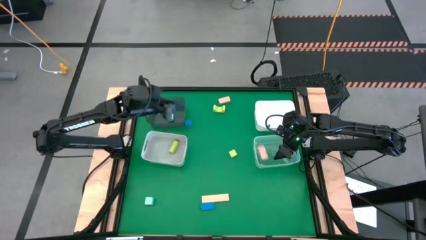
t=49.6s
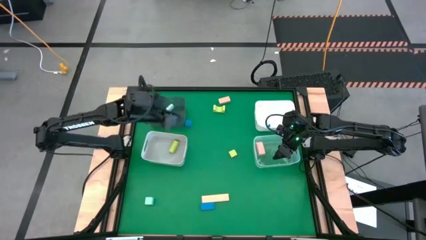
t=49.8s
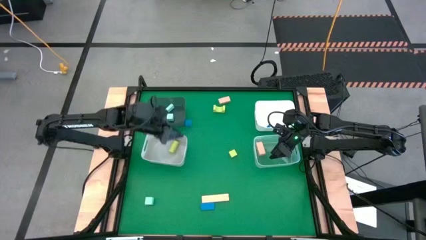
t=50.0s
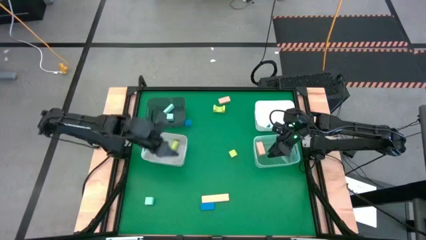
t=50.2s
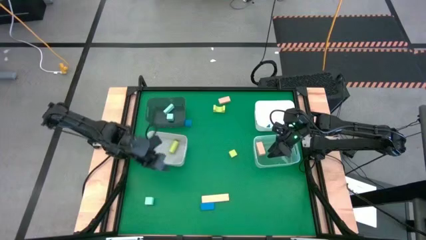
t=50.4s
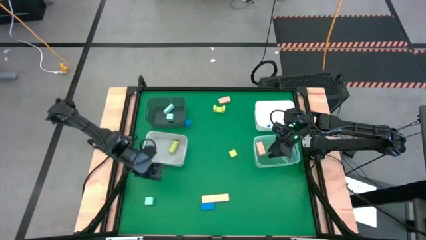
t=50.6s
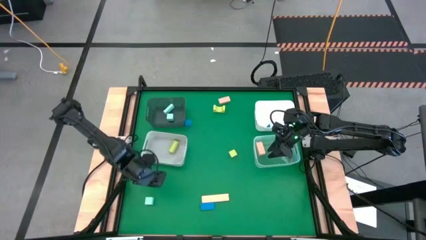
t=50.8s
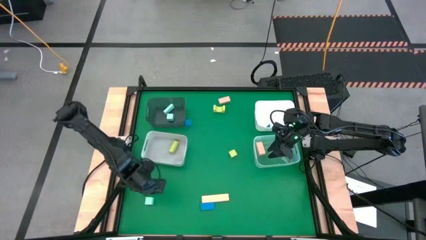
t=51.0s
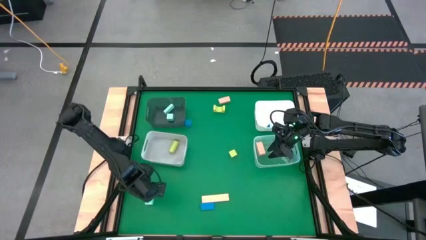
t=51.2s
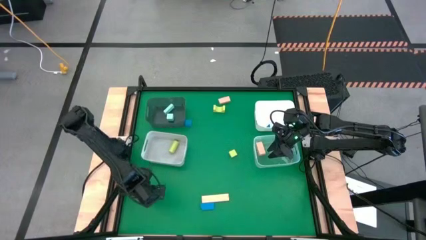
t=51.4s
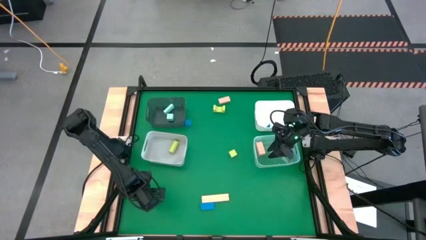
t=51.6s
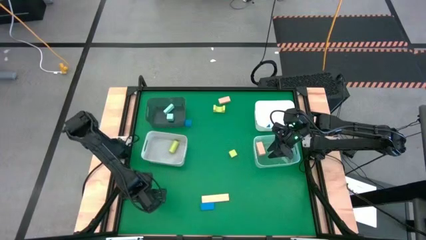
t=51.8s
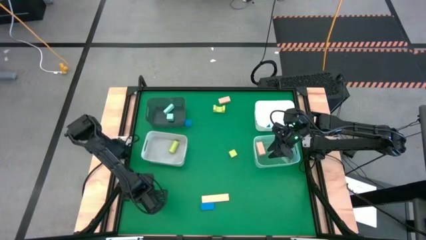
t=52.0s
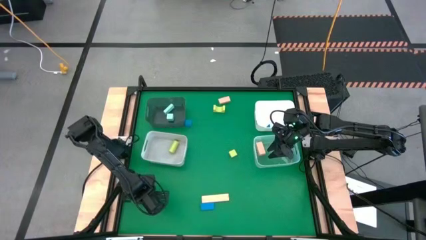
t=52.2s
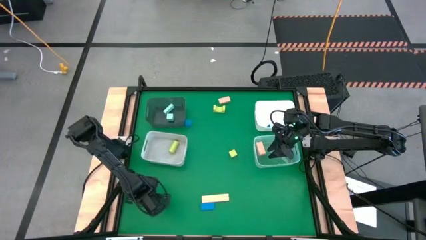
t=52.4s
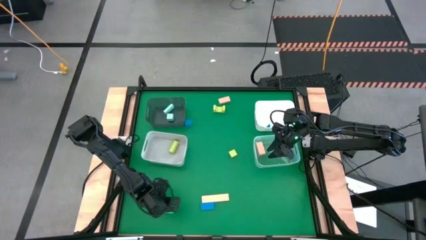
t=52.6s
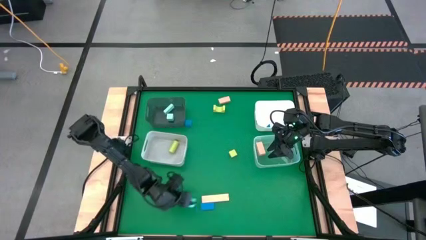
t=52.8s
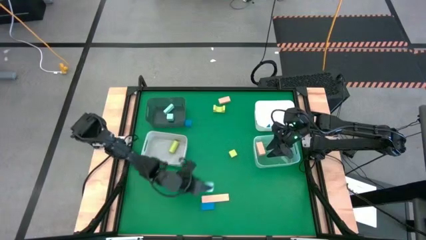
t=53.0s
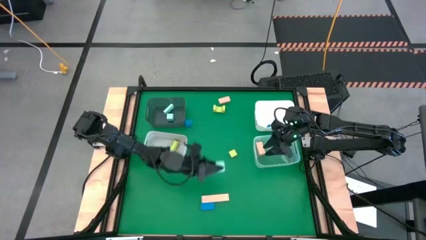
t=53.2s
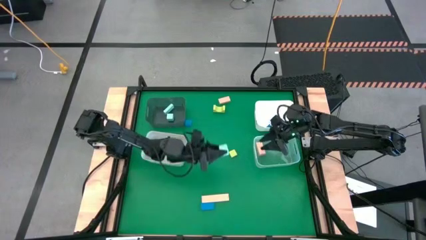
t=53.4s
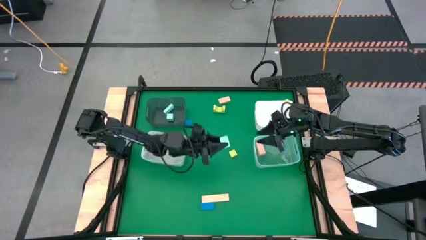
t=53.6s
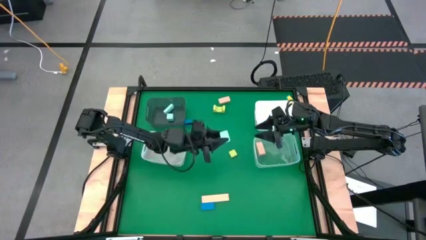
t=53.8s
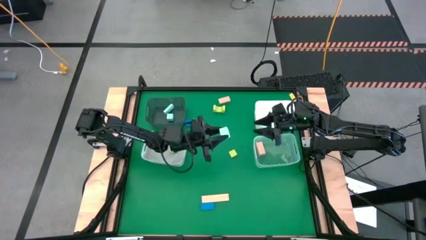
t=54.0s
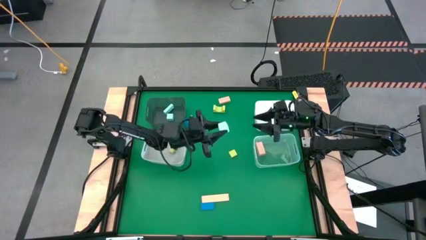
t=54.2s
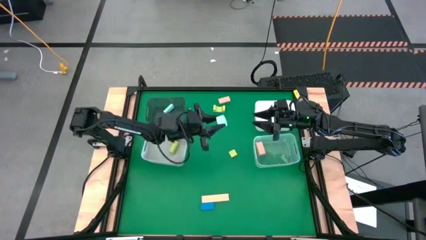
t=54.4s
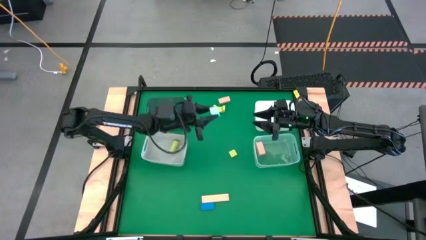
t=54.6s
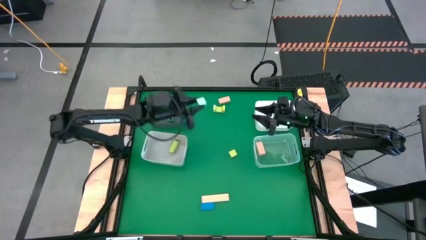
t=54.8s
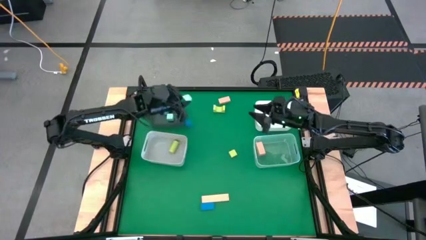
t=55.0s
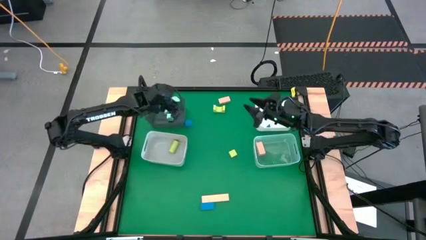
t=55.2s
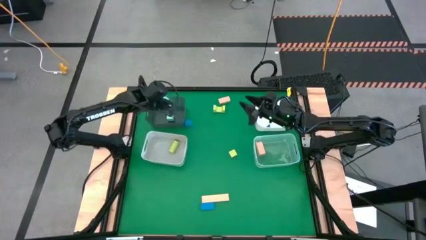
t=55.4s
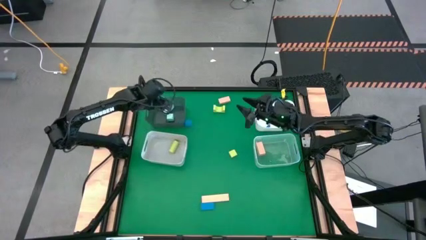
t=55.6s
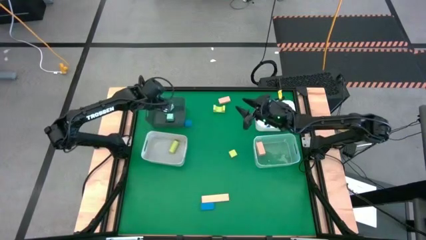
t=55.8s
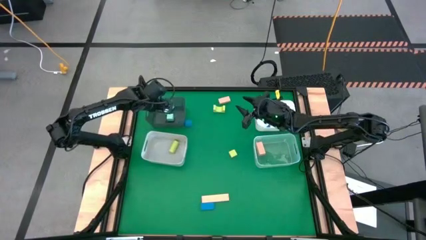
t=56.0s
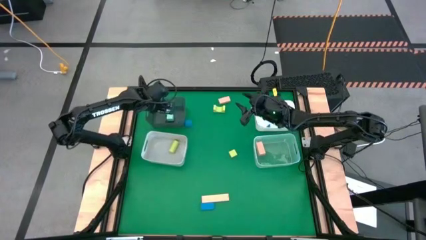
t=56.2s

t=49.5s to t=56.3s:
Task: Sort & place blocks by color
Put the light blue block into the black bin

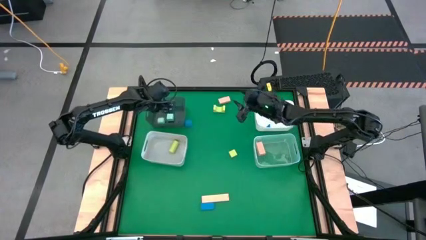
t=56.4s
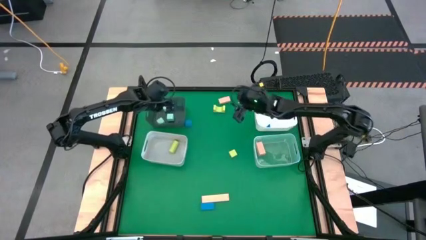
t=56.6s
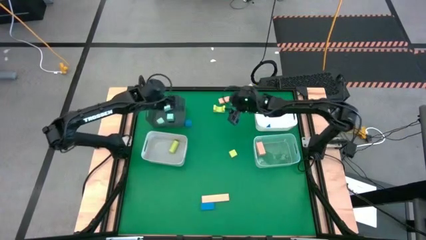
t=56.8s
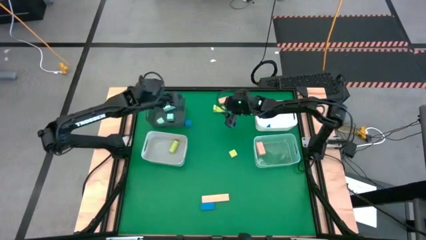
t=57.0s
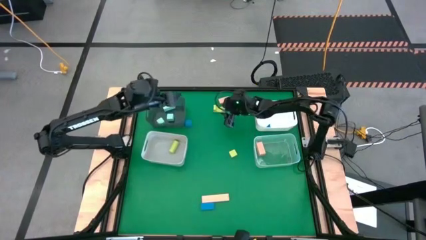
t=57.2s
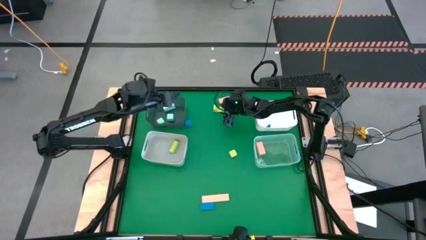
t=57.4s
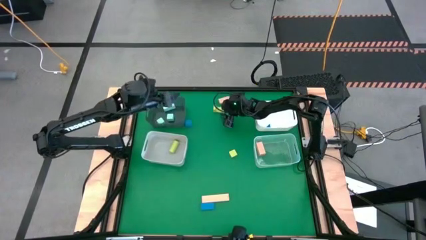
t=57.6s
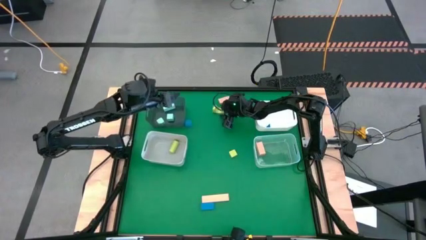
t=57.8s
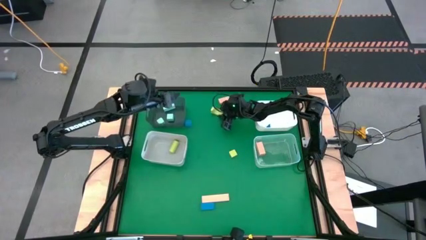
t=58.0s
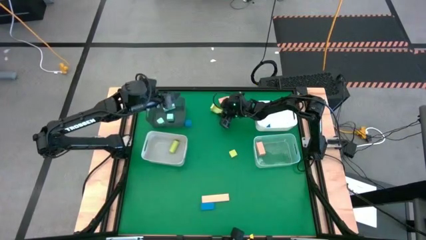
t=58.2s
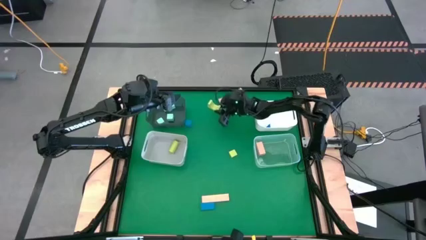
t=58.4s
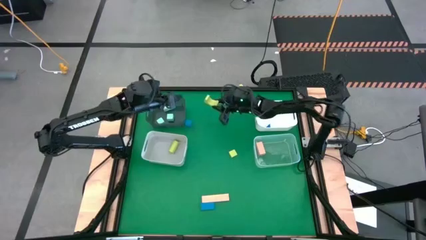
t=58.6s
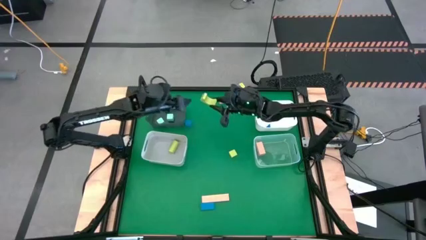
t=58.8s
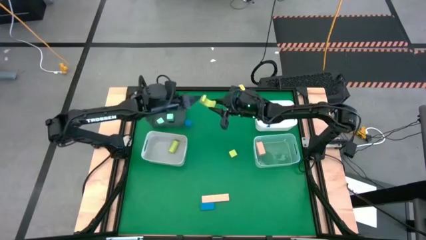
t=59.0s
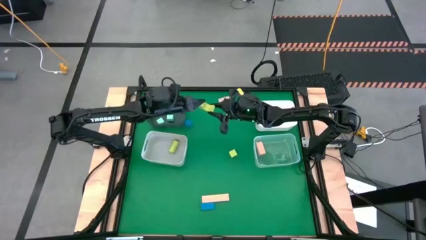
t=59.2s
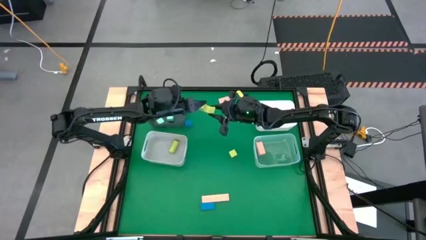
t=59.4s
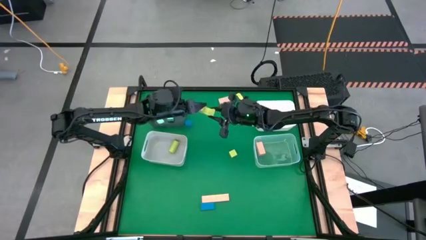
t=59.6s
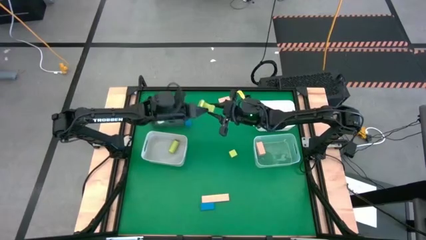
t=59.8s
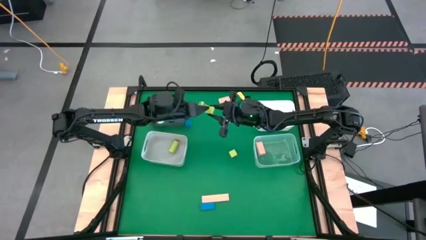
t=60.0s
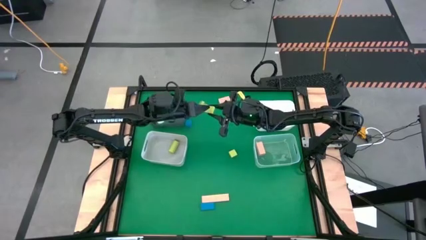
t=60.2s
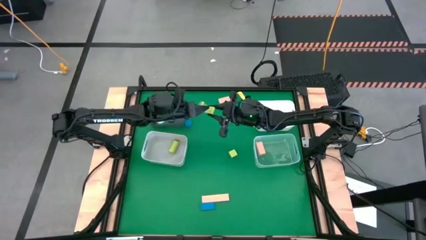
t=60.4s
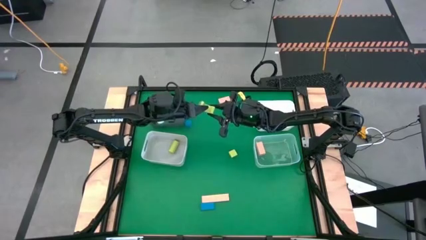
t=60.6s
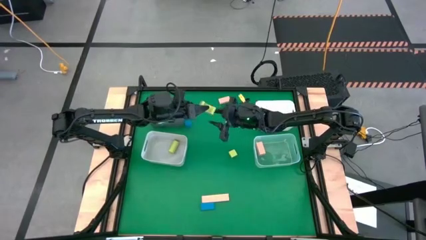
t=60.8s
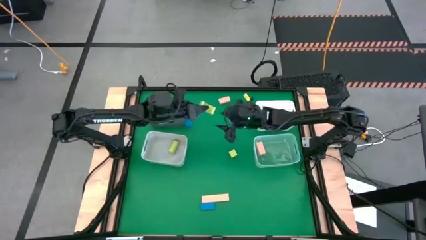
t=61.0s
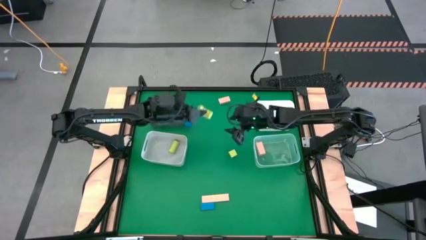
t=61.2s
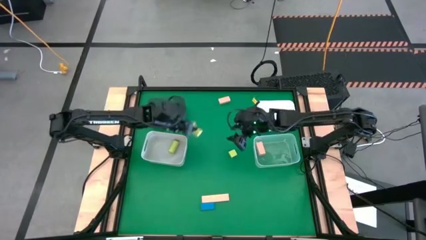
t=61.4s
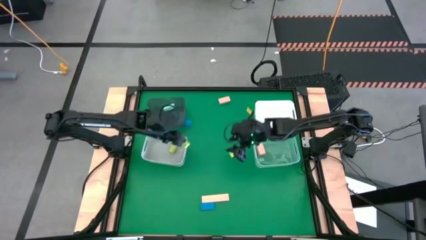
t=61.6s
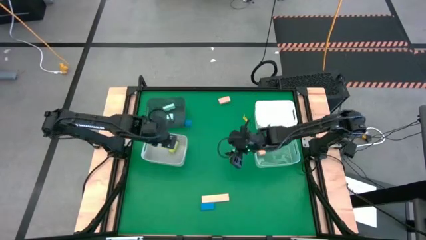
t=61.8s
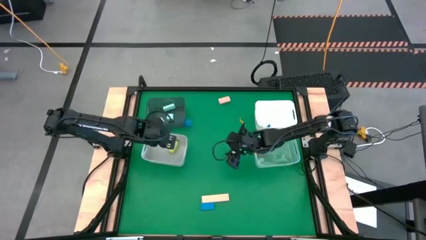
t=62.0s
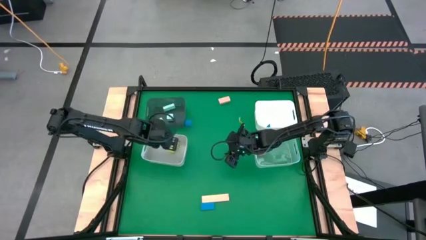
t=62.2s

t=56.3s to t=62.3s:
Put the top green block into the gray bin

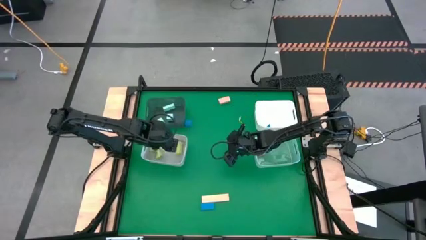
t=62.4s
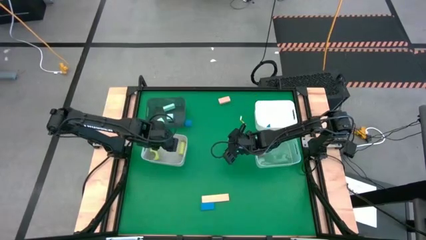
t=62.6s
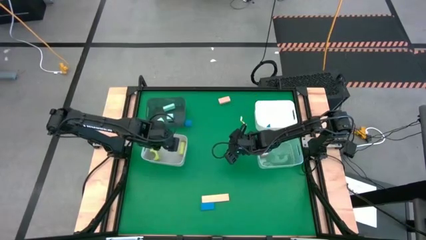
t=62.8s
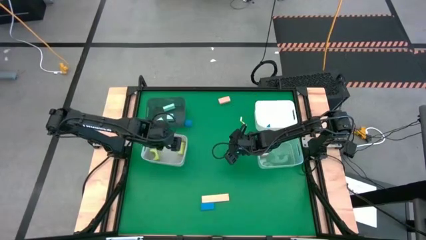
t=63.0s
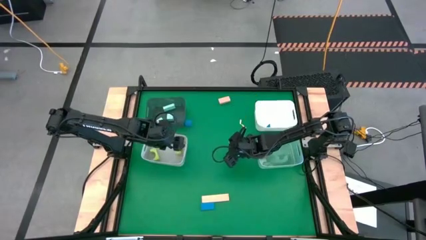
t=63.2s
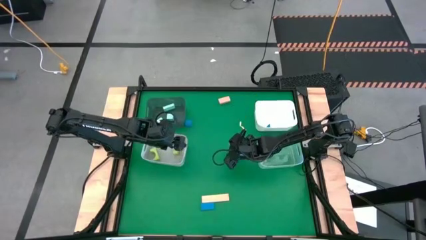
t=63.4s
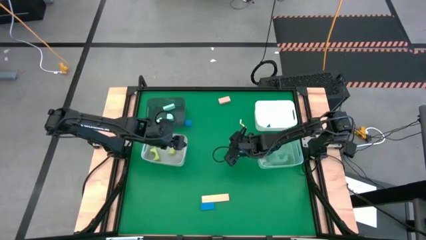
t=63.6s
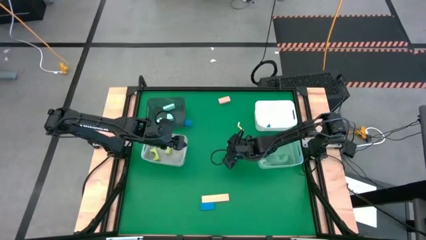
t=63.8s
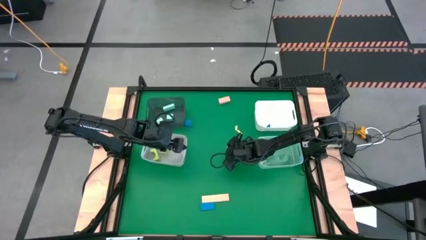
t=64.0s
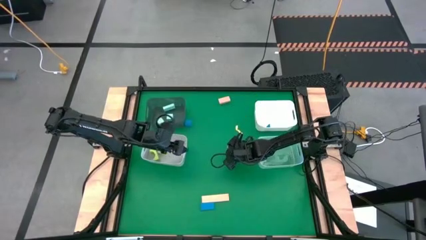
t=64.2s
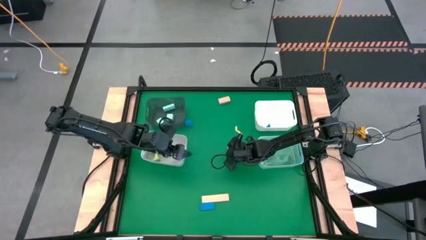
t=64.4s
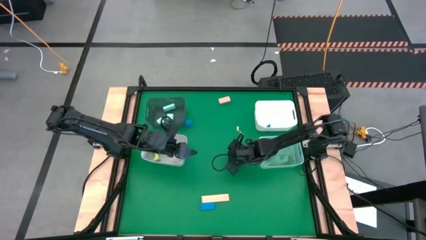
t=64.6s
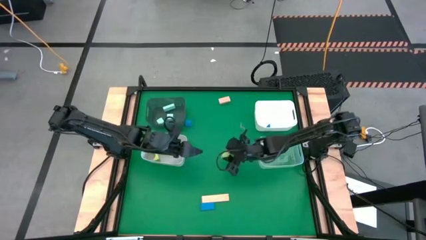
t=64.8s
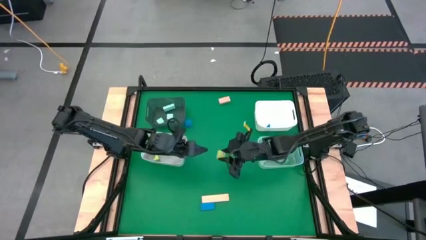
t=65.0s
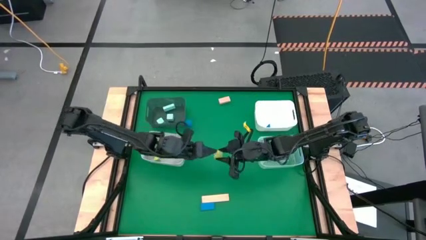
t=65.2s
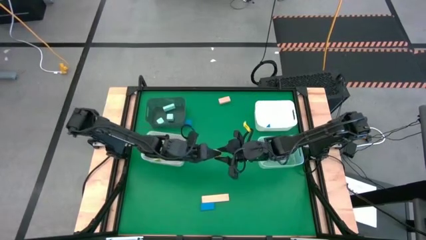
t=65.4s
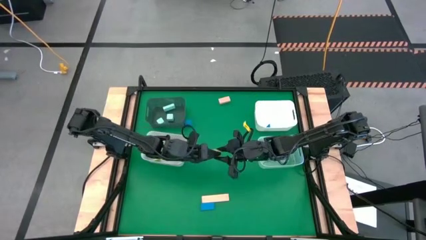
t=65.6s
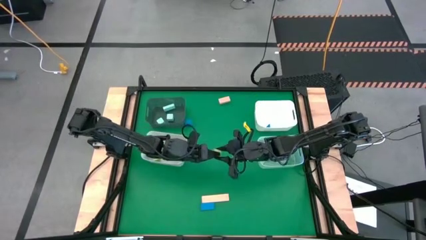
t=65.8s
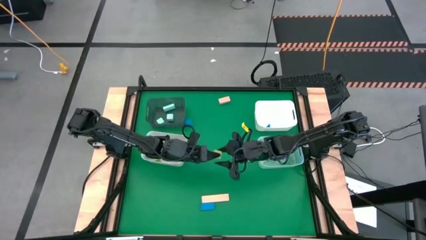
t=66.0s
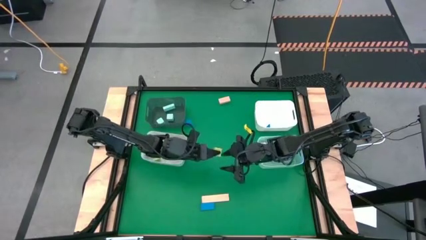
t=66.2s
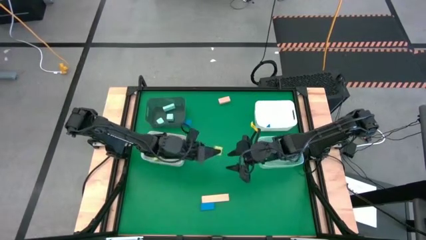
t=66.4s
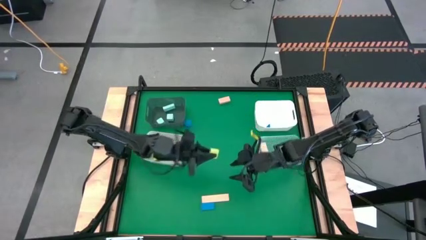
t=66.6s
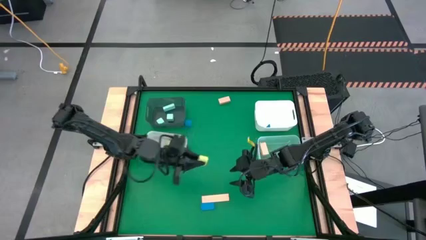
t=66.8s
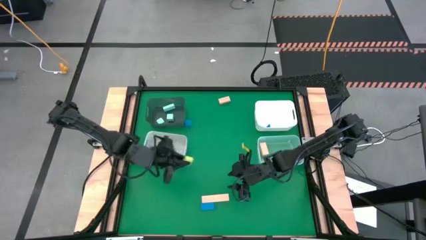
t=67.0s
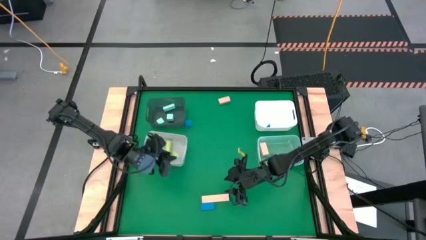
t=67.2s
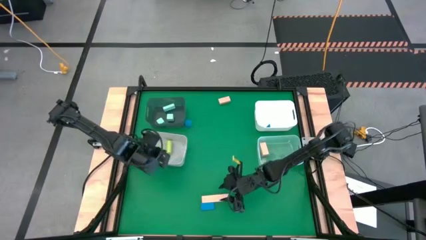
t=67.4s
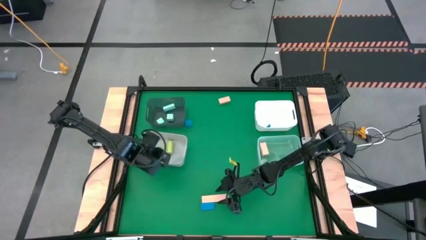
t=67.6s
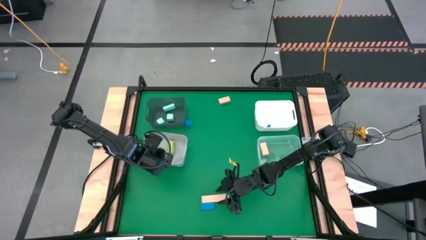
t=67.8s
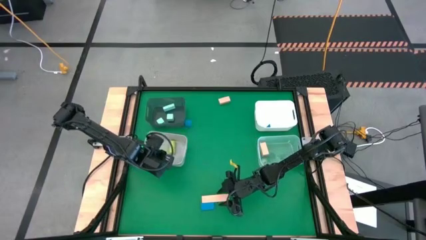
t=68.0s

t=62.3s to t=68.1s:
Put the green block into the gray bin
